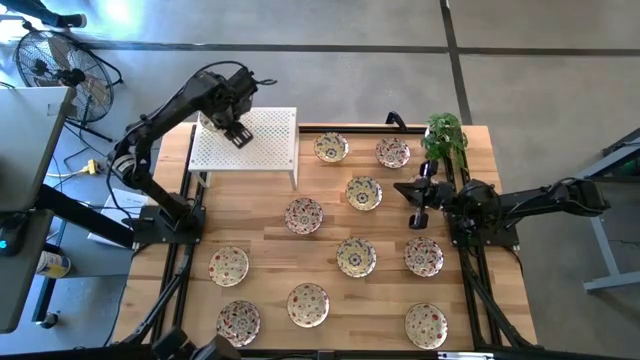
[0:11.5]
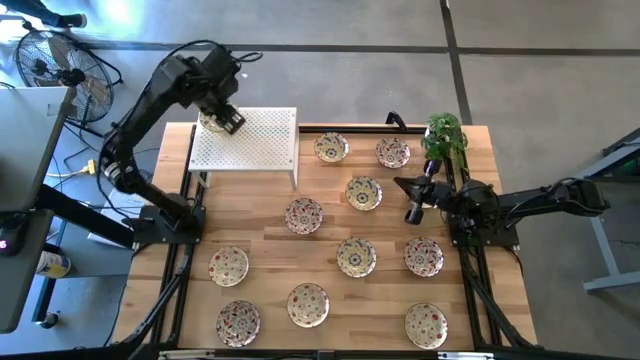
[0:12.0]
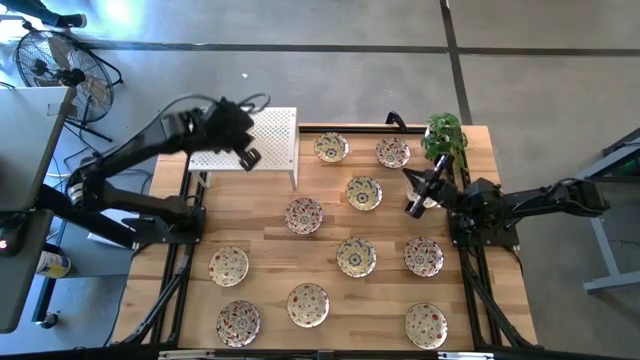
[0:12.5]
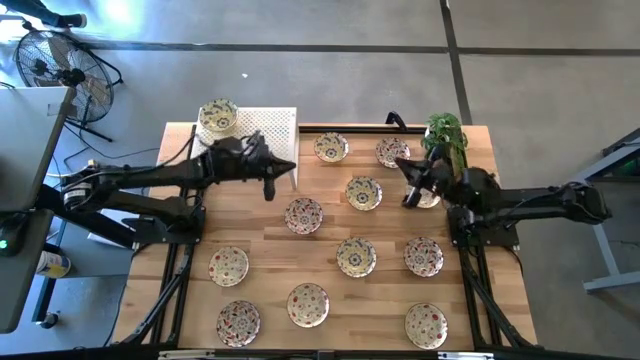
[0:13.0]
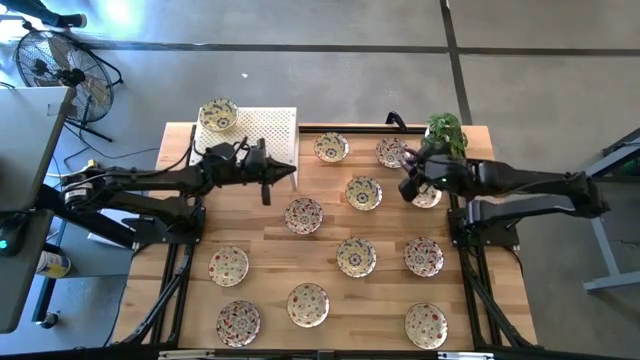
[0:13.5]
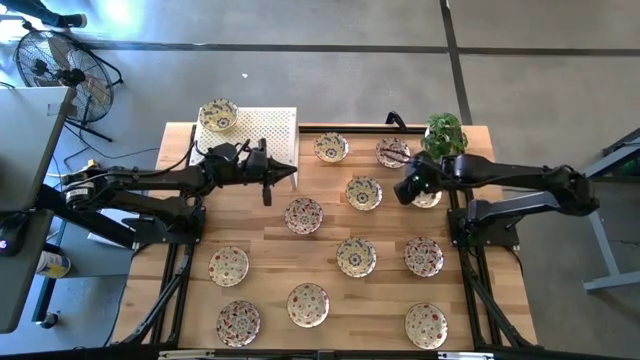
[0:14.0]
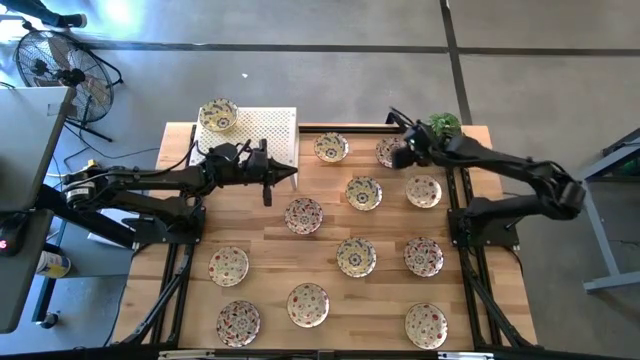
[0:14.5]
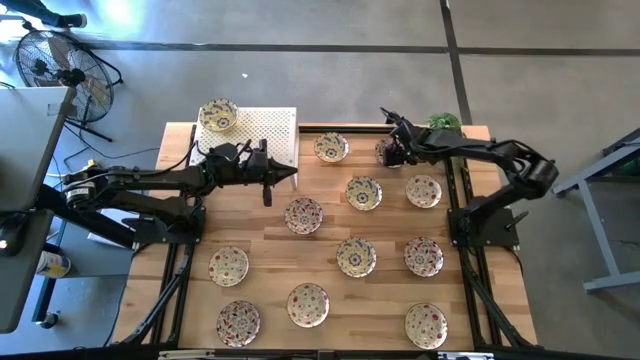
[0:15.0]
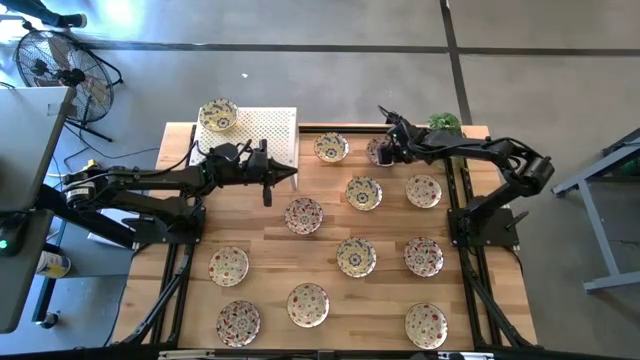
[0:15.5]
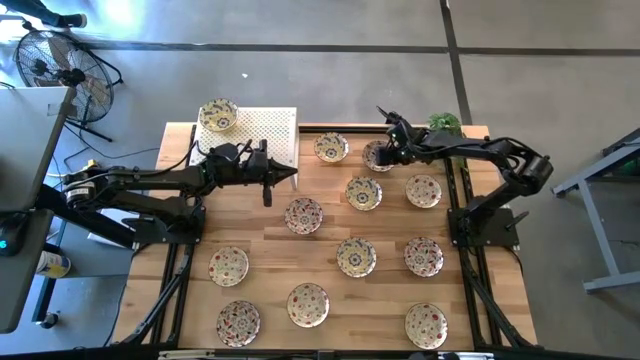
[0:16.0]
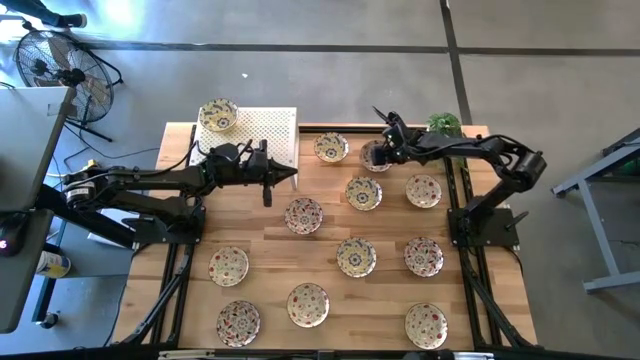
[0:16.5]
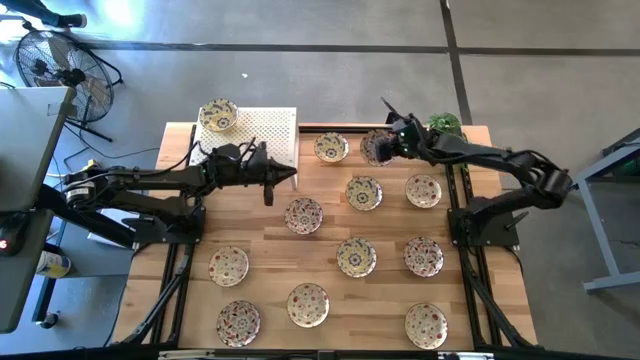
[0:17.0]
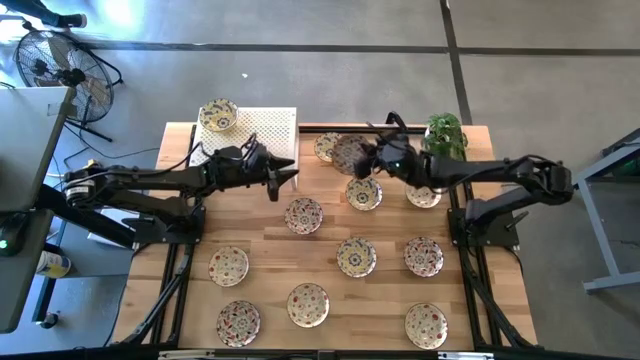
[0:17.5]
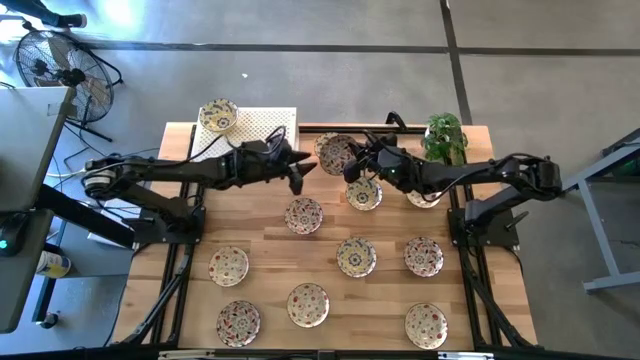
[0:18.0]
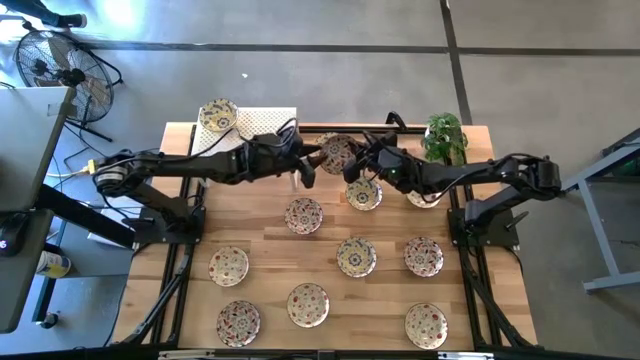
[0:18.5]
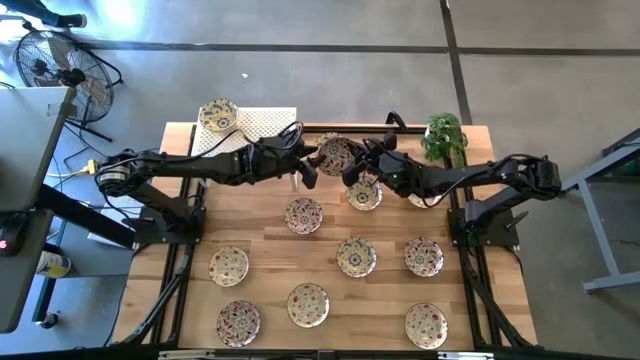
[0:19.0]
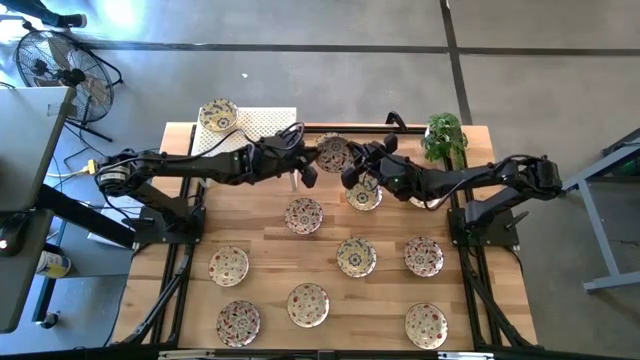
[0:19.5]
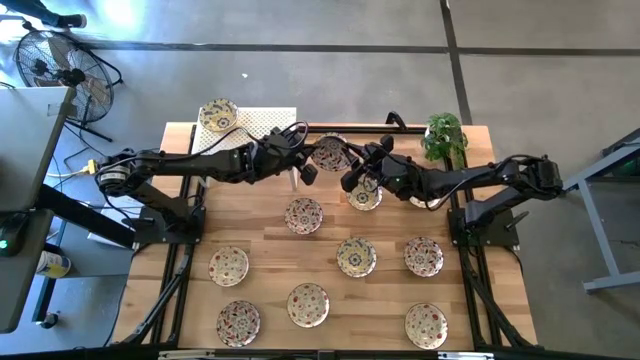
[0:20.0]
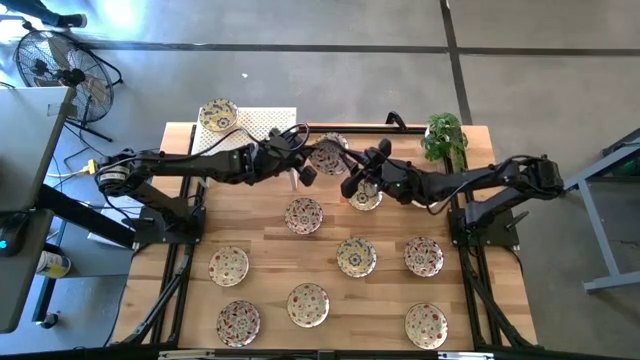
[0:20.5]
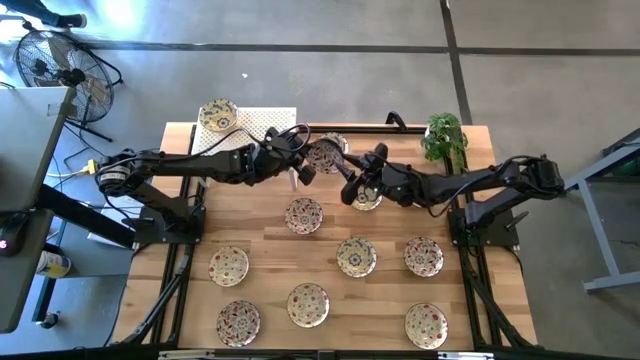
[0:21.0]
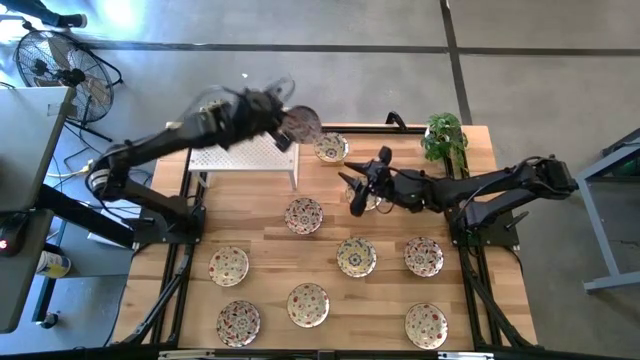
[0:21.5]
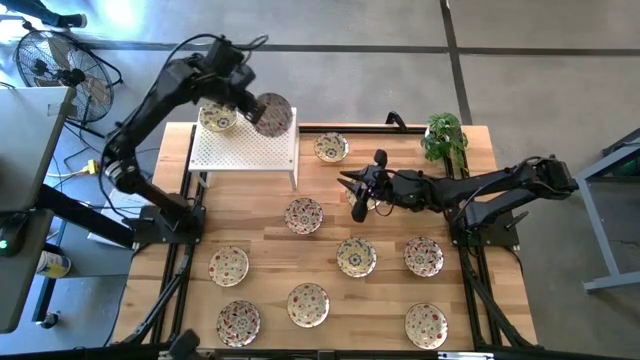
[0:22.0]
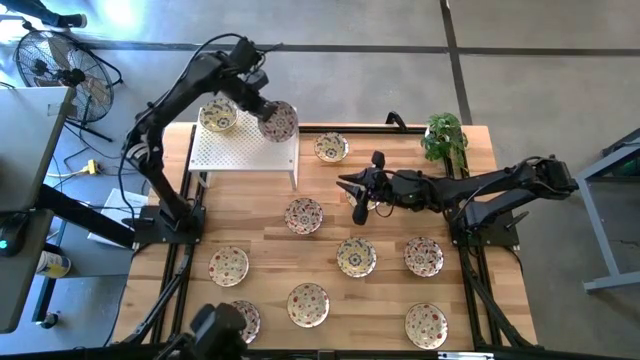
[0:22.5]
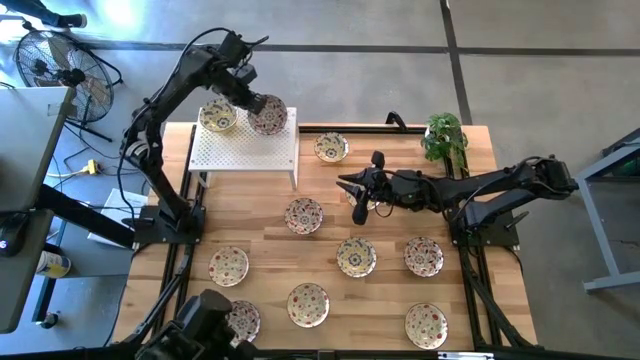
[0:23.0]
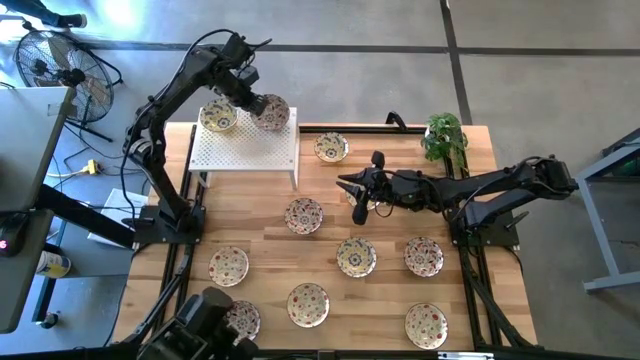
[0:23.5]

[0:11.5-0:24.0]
Task: Pick & Place Mini bowls
Put the blue patterned bowl on the shelf

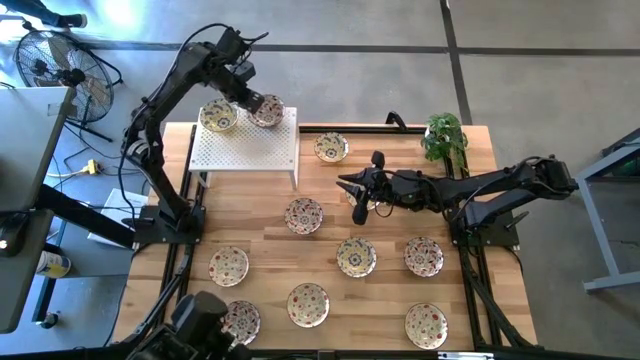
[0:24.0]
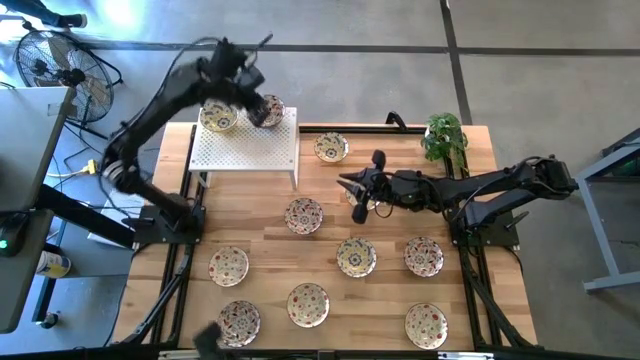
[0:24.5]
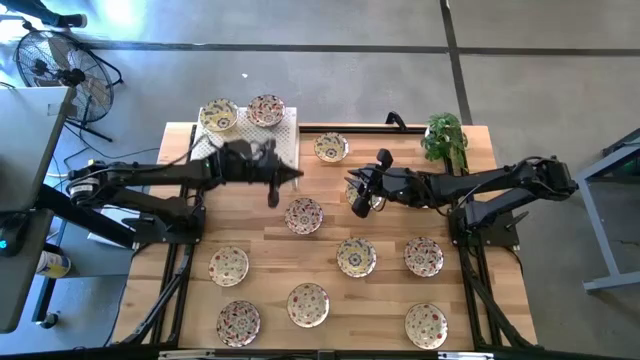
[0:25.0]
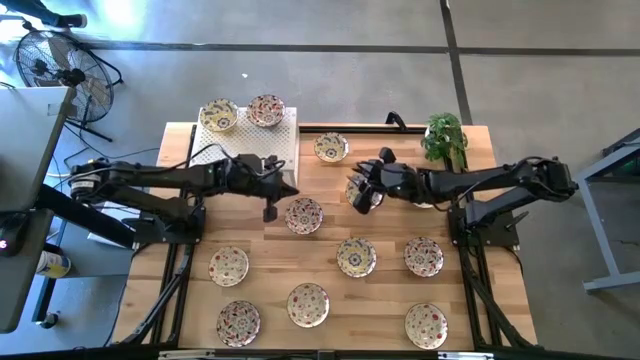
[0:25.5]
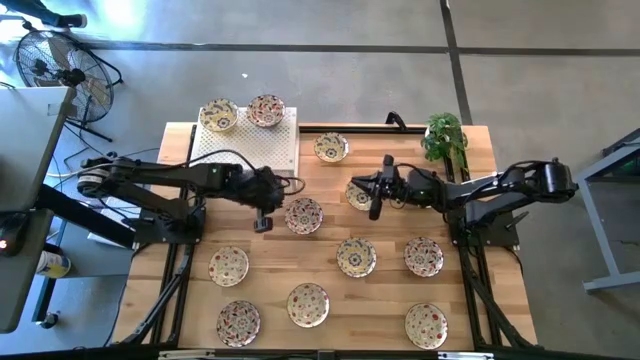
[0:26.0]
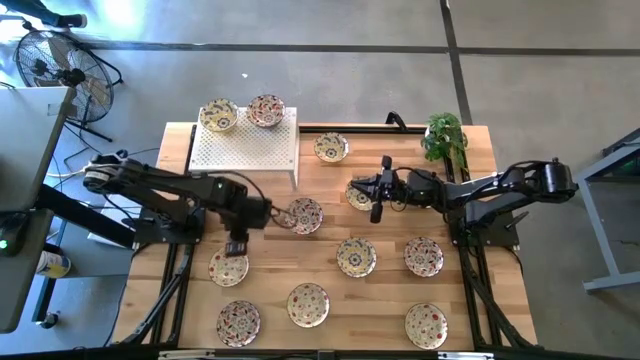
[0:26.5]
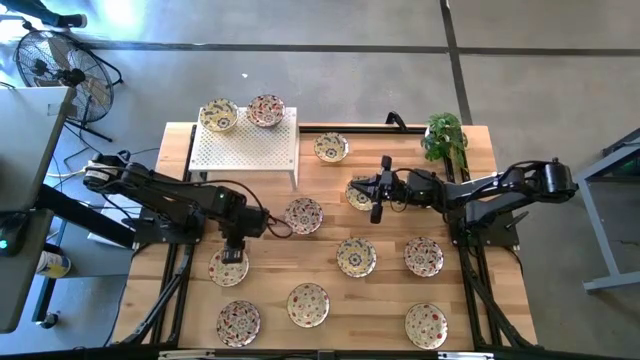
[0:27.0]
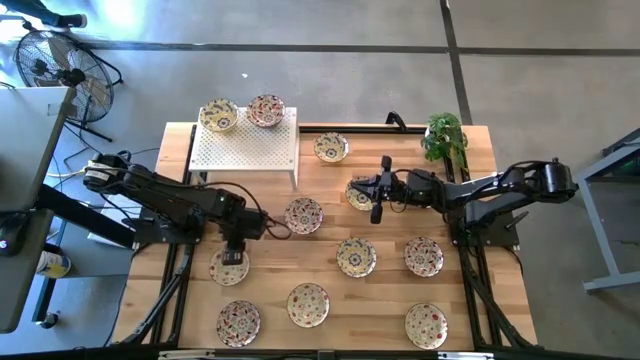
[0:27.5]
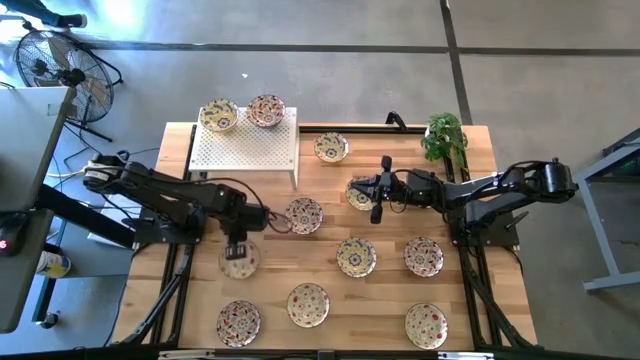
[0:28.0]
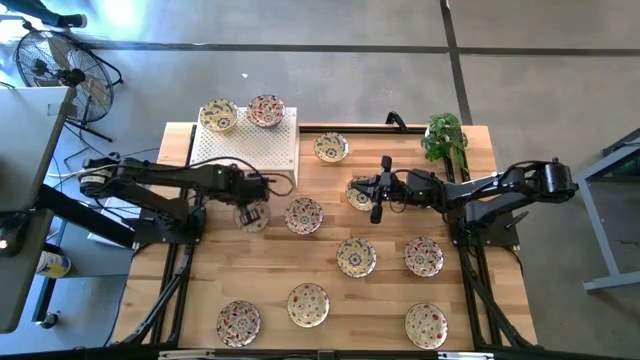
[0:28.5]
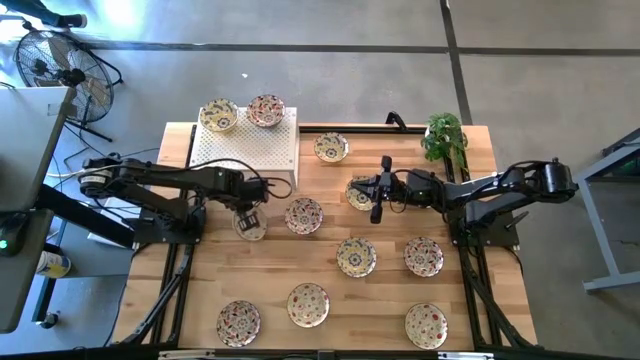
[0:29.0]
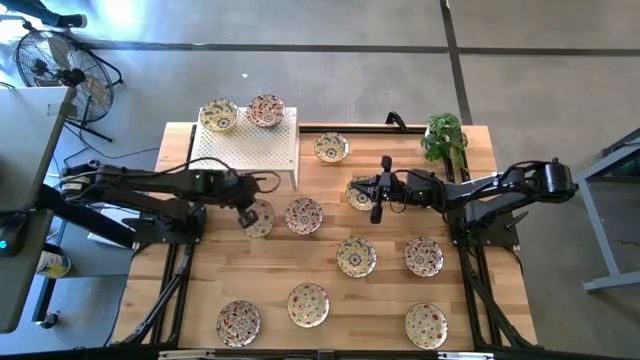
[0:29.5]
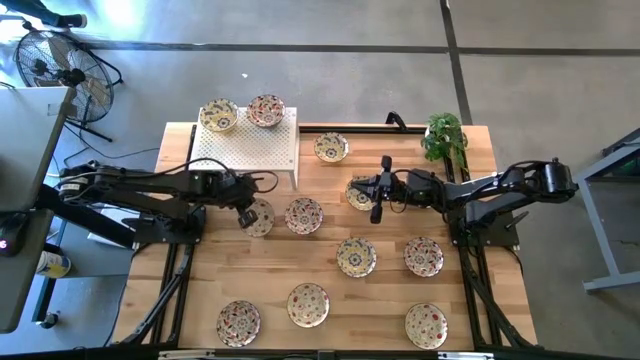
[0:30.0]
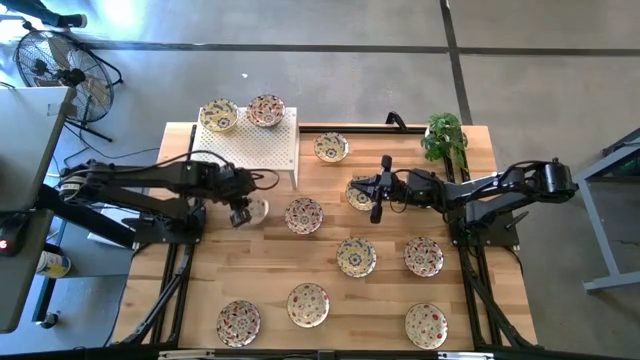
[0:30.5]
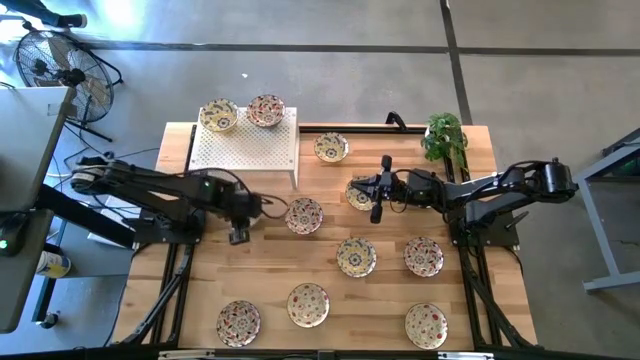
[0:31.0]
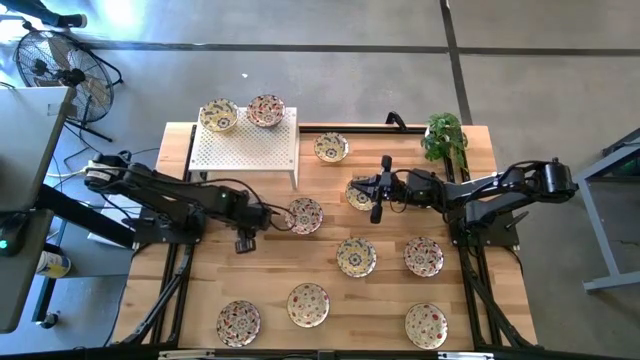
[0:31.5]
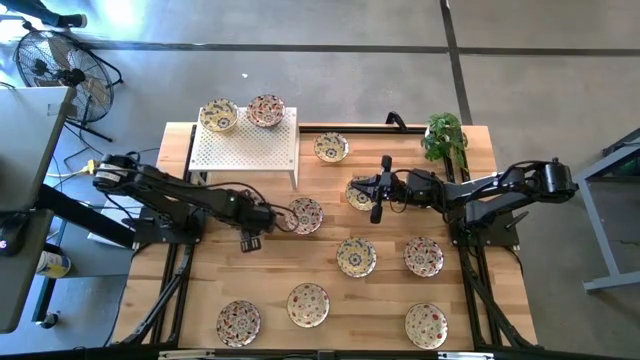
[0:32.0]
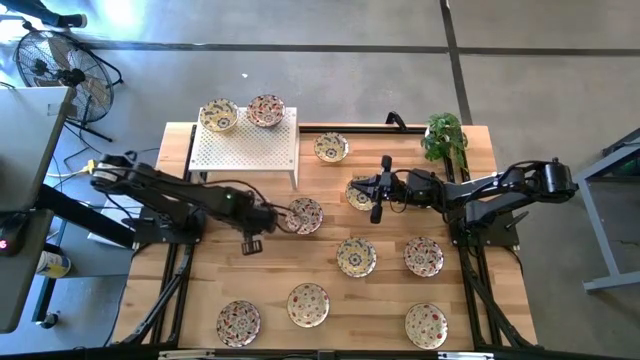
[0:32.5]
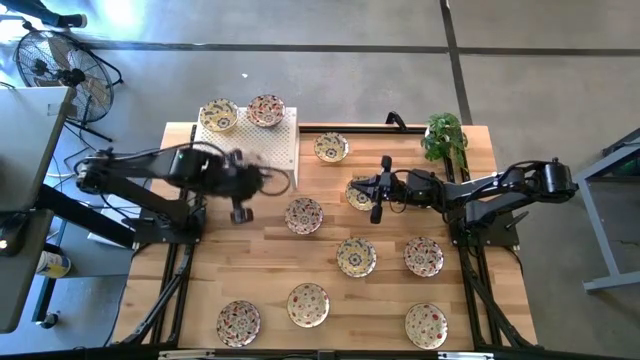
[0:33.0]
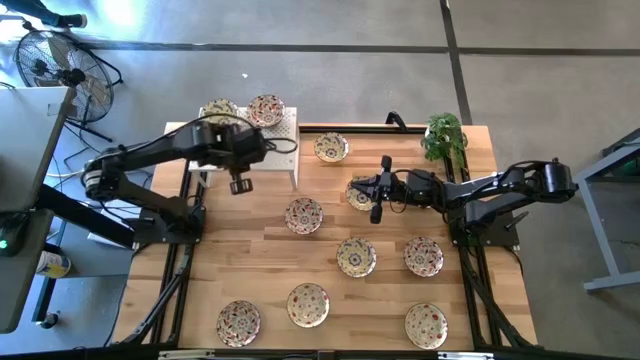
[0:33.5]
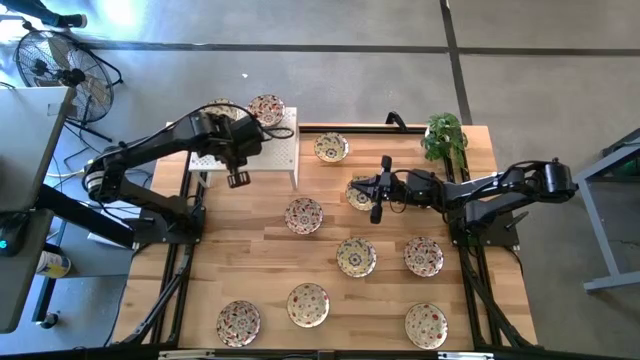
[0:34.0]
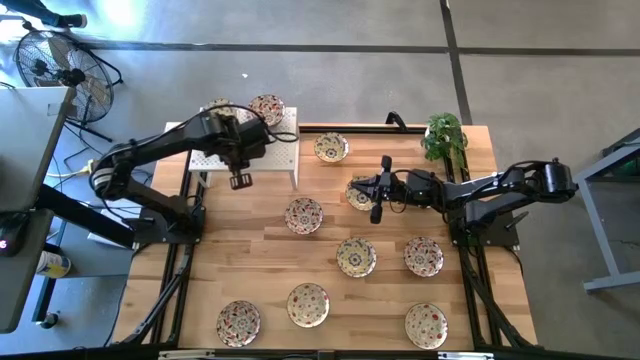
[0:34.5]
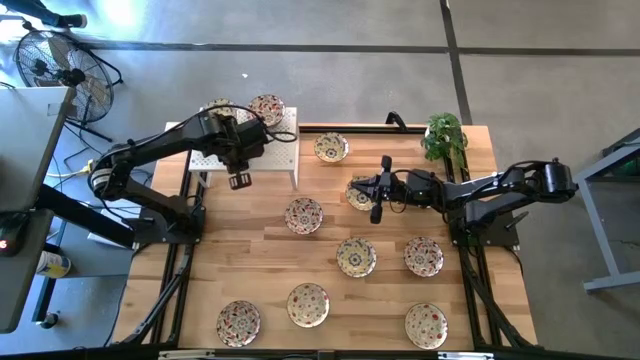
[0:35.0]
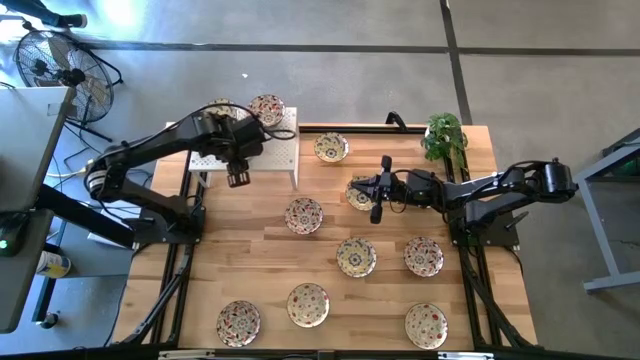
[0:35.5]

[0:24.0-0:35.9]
Put the green patterned bowl on the shelf
